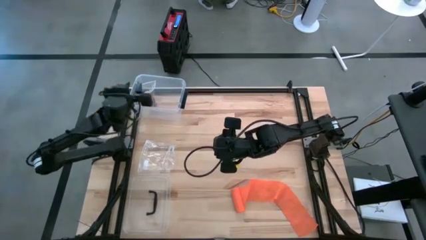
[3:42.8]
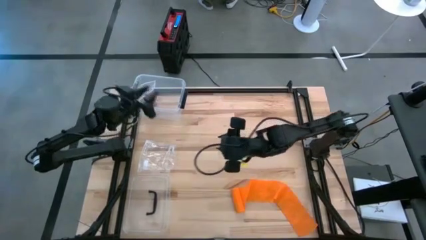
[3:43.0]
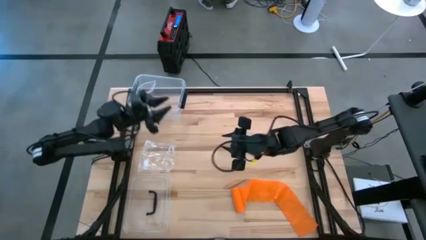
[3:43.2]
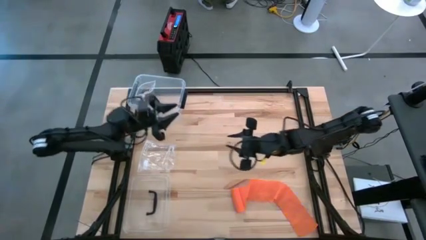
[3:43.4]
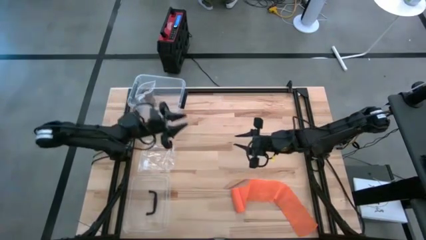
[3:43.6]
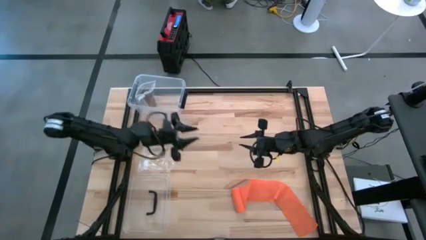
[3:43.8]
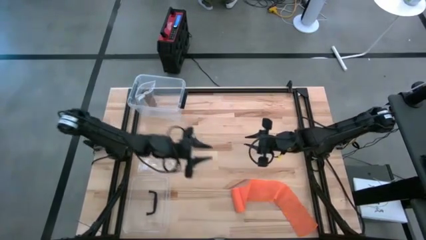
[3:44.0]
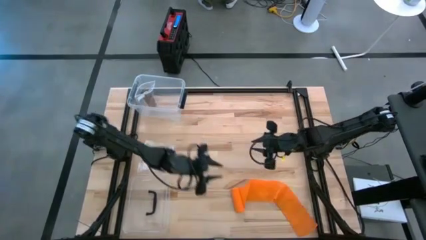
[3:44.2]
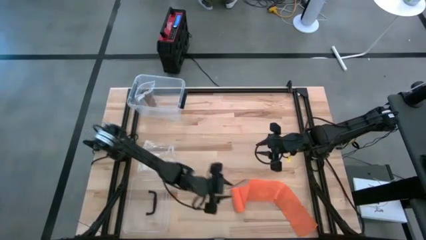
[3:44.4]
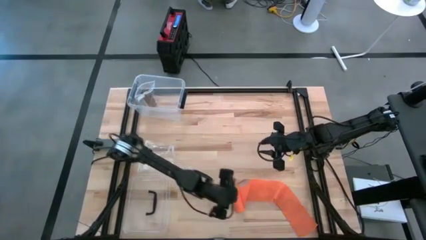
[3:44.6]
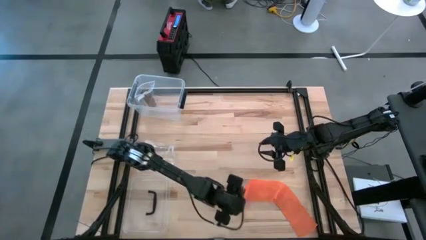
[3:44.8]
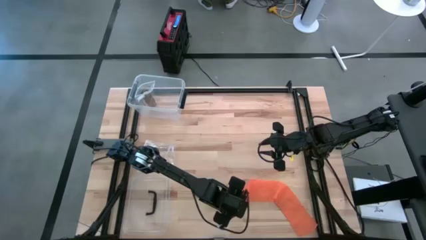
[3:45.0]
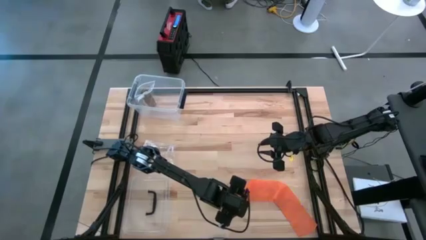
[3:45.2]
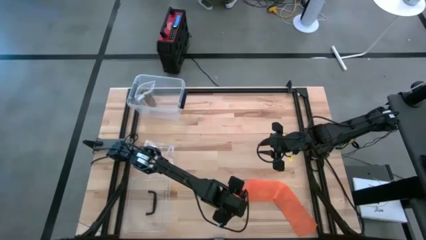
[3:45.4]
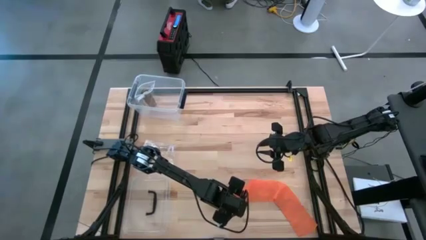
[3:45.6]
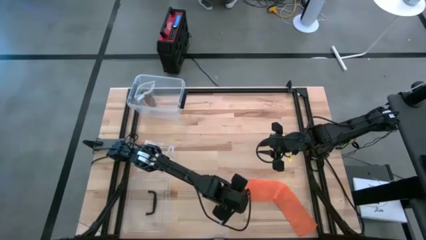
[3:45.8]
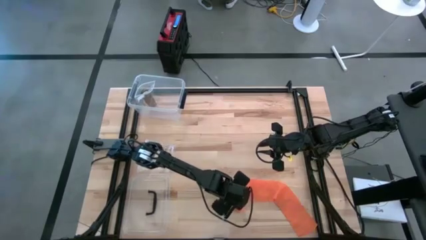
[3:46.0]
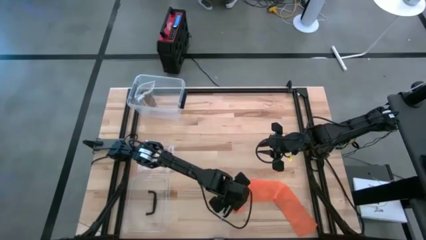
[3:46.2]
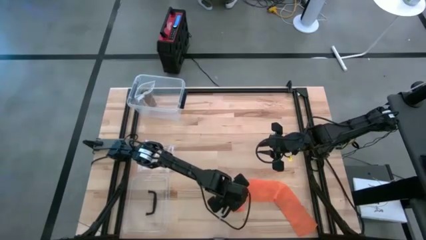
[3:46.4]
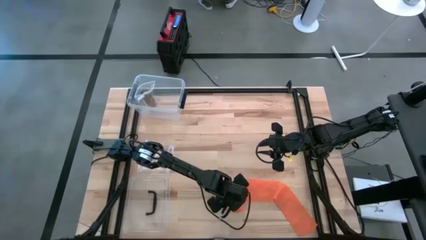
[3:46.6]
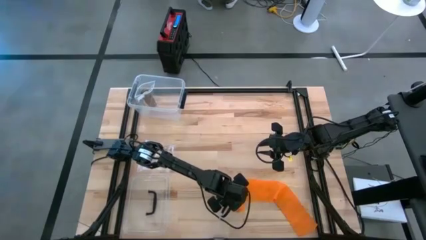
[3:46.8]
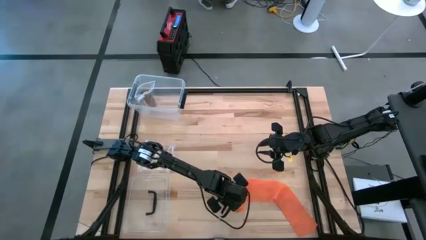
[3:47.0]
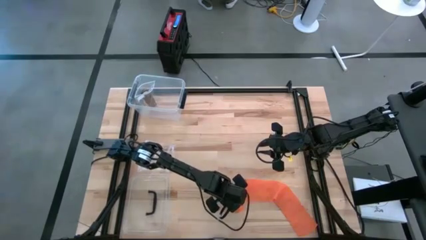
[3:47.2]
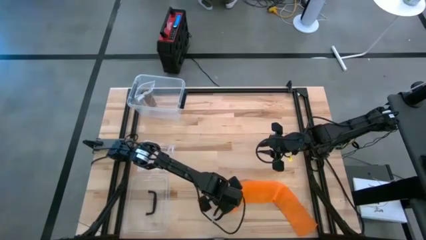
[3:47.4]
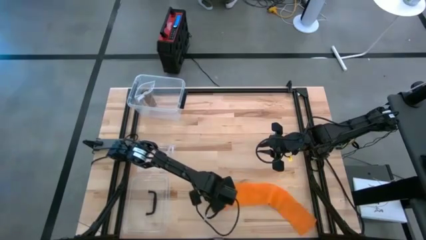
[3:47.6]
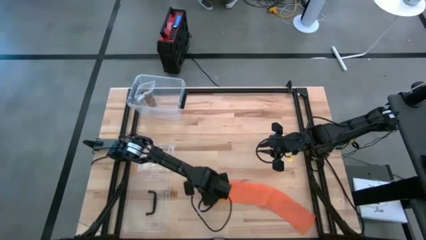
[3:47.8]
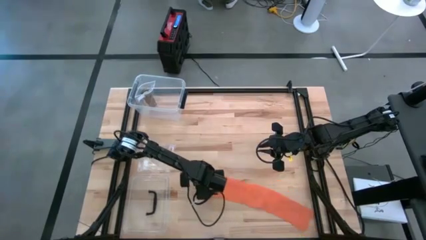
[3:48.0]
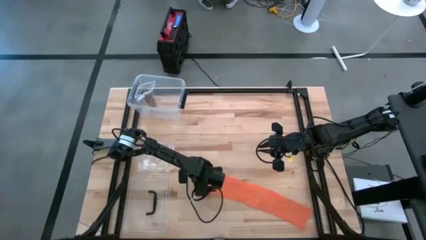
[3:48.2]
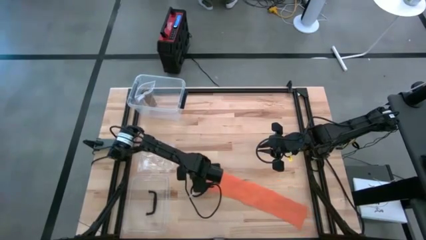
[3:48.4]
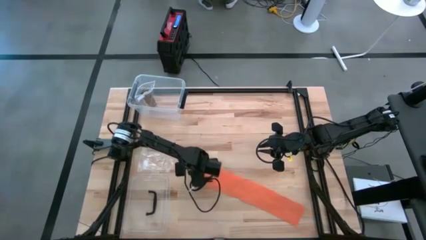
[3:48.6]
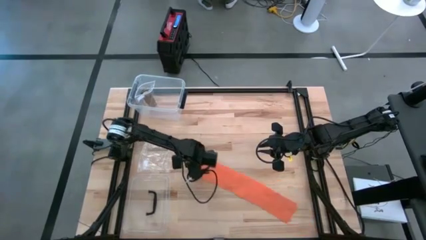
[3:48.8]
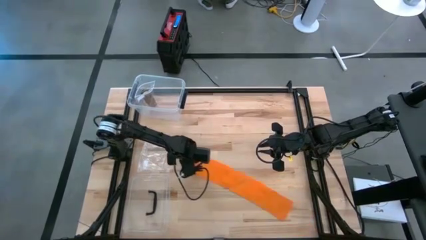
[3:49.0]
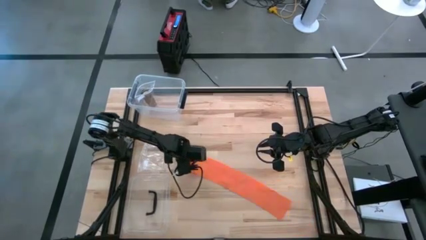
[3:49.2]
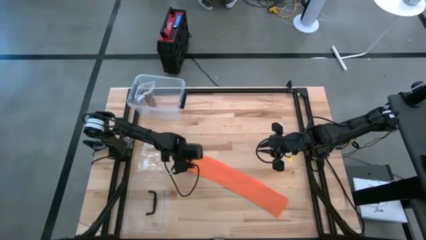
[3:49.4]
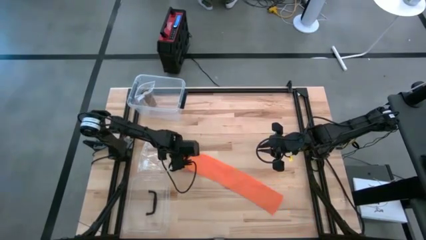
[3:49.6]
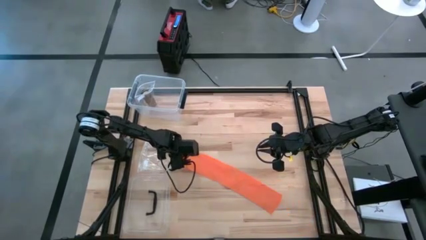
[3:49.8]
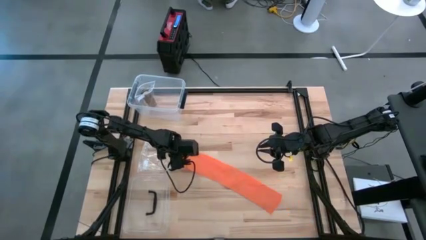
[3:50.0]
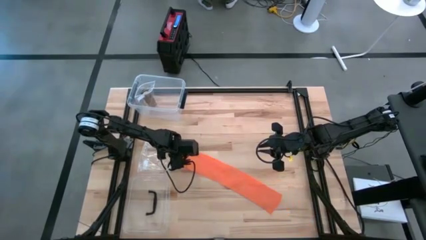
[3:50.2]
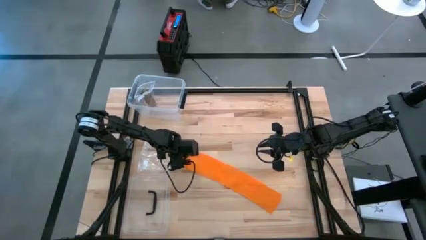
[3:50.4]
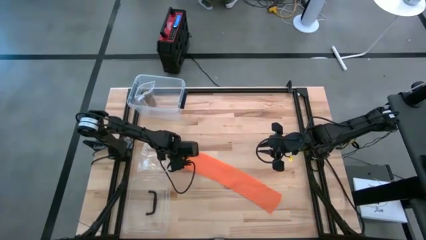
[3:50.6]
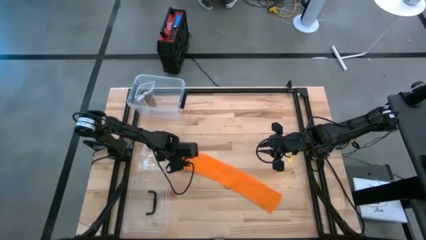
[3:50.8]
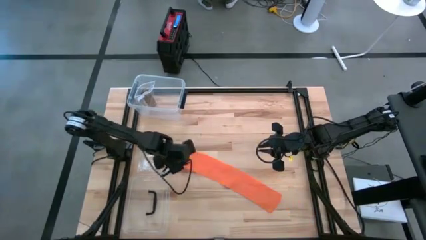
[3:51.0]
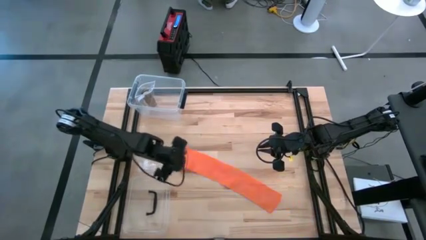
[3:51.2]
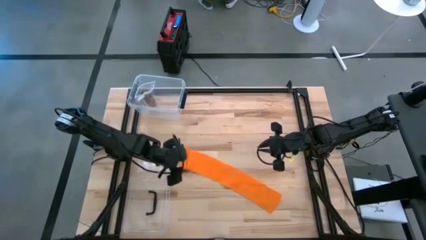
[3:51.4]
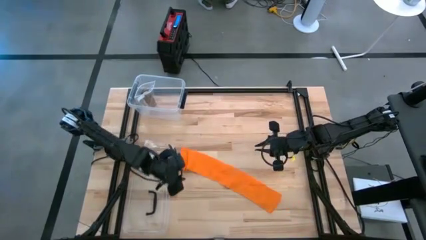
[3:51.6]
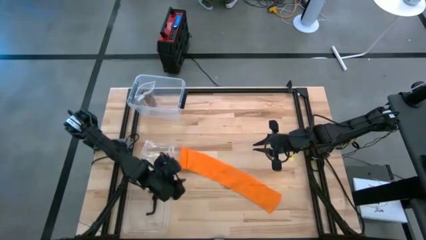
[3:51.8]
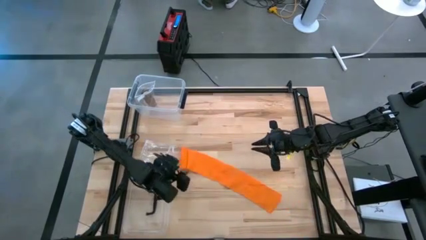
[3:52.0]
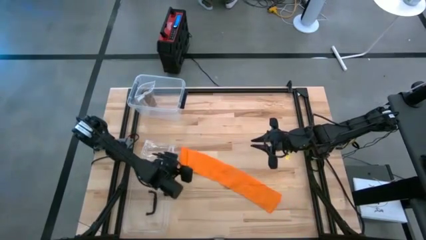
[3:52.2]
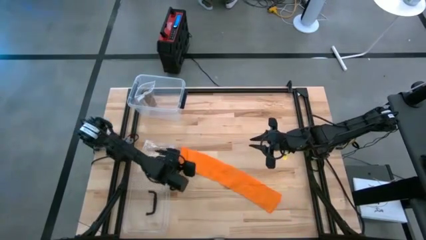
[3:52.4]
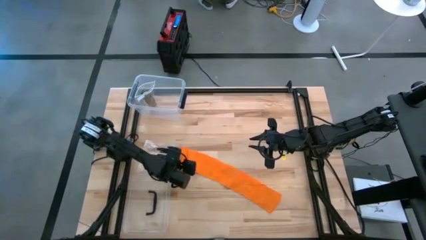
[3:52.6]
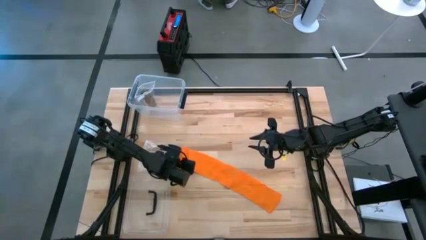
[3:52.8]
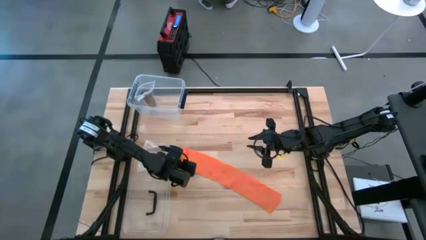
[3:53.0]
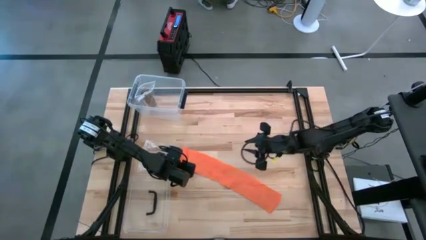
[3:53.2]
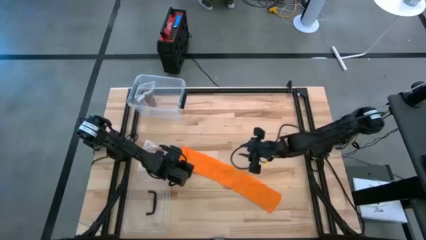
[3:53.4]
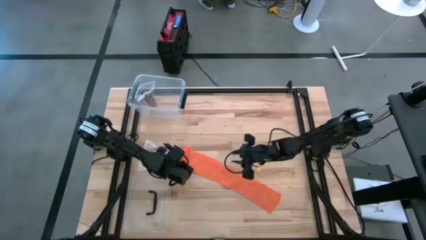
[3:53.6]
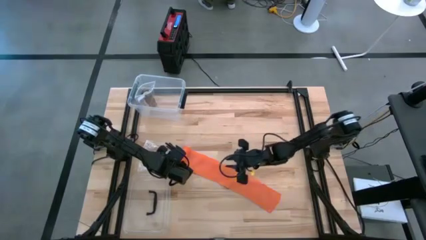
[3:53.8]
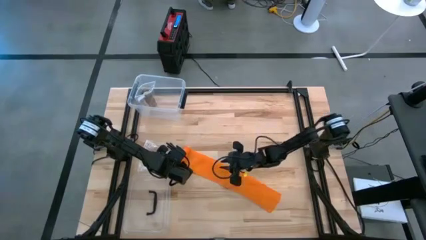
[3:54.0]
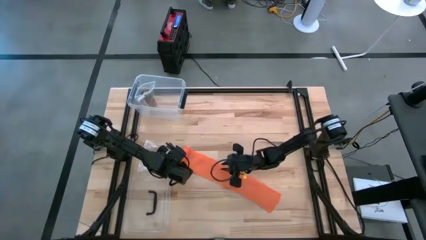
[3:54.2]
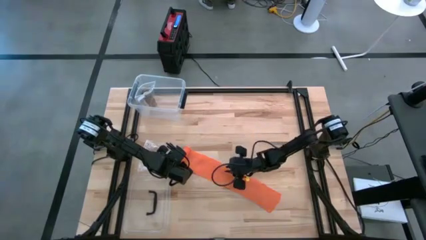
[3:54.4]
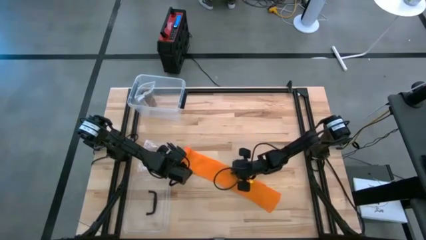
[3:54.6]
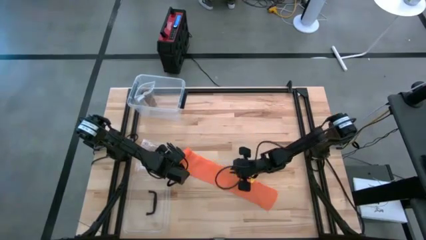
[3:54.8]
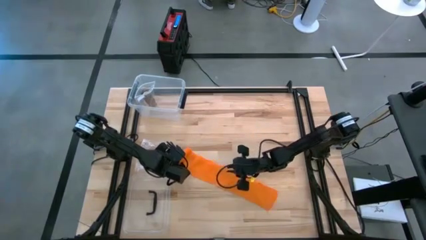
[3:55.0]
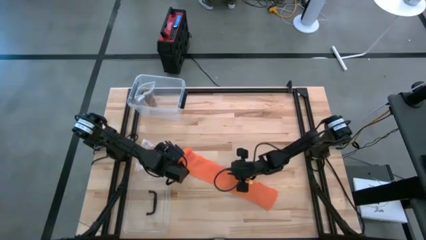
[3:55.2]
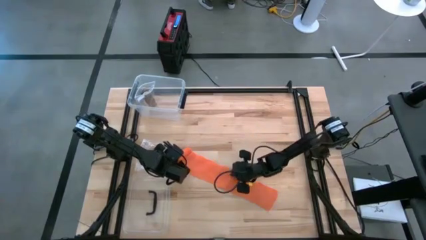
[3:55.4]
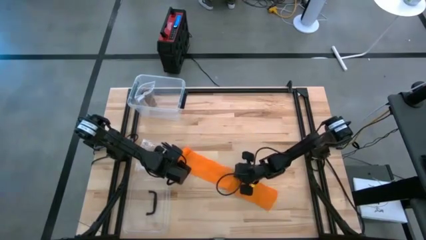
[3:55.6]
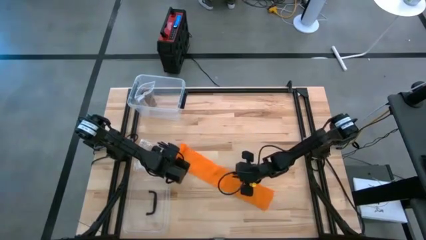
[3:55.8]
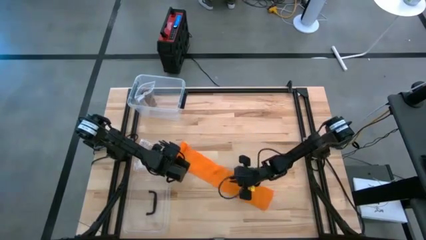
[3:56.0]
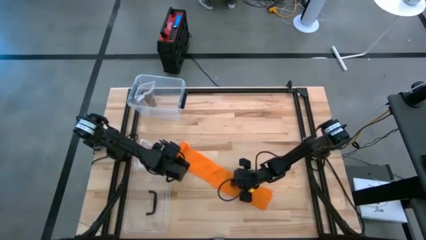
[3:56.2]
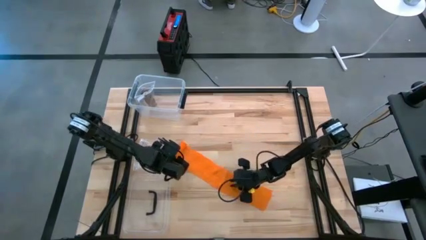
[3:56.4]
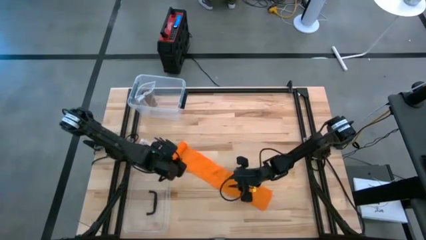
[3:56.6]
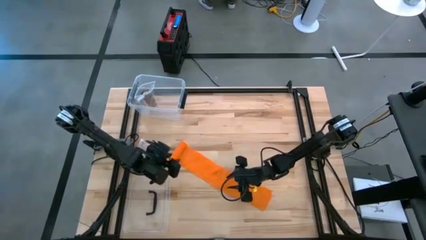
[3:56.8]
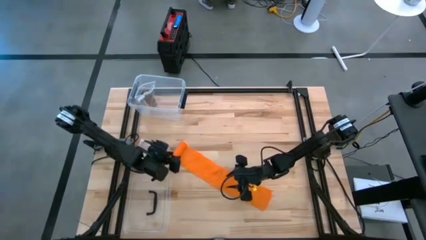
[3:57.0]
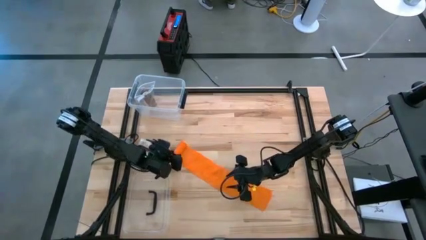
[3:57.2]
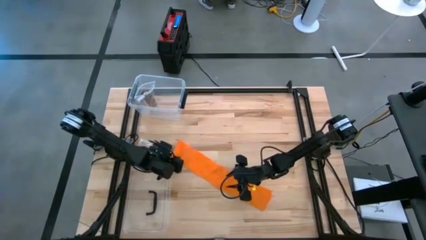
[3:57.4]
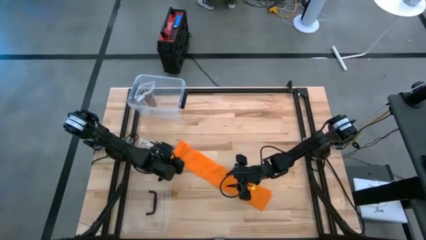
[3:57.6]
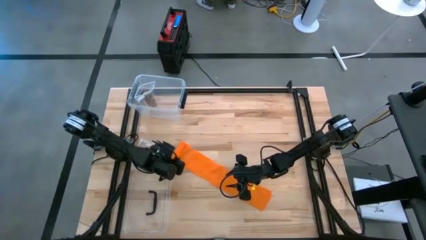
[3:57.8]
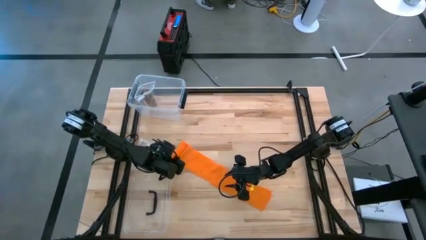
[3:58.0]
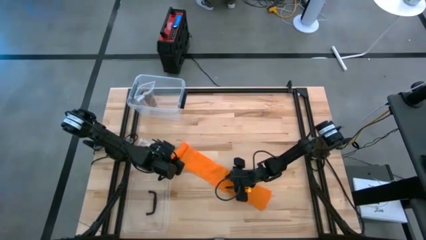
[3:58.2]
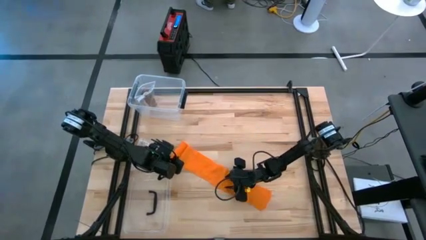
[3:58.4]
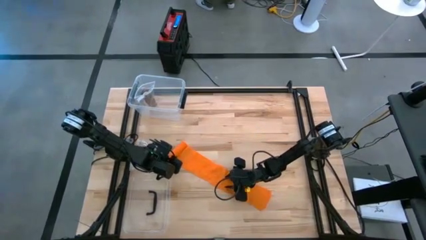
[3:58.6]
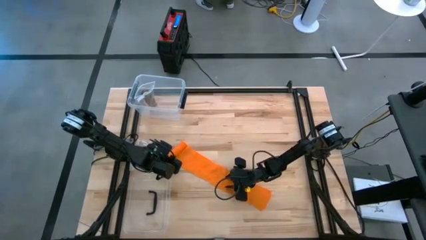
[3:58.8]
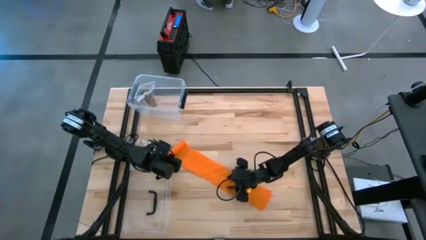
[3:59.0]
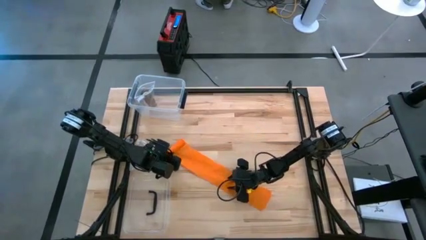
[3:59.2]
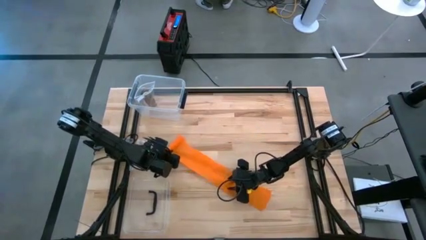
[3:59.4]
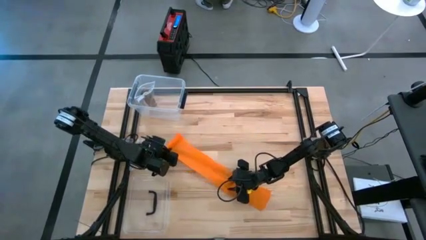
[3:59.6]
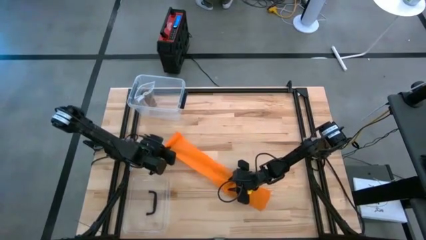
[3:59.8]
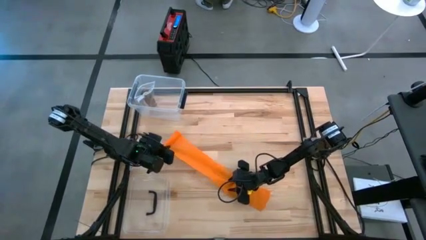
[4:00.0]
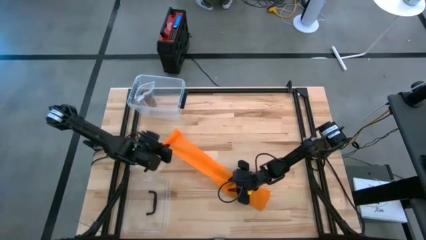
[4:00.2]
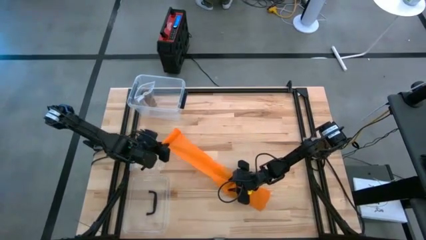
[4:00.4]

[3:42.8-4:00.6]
Task: Roll bandage
Roll the orange bandage
